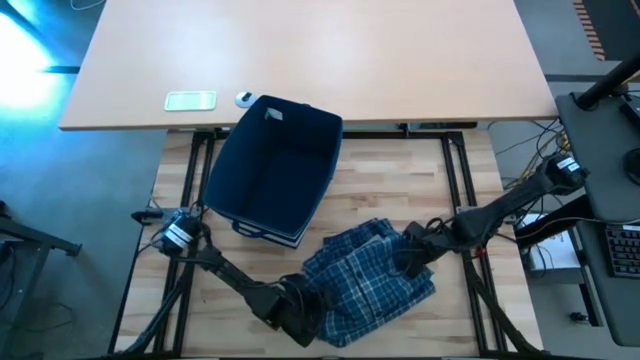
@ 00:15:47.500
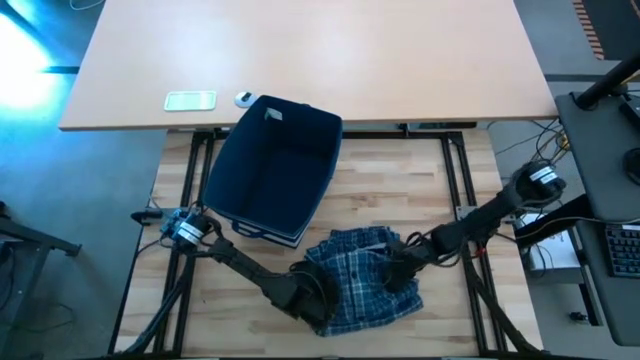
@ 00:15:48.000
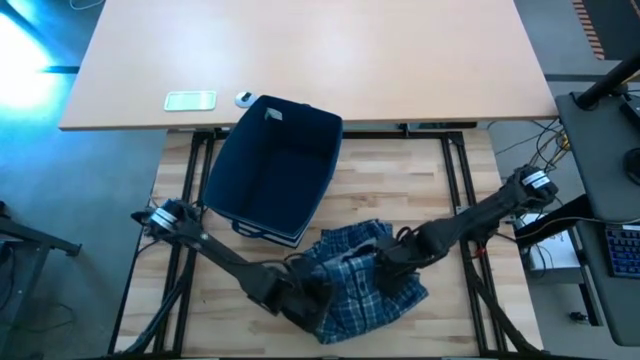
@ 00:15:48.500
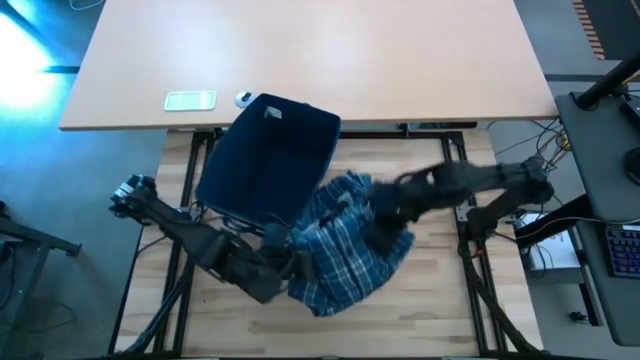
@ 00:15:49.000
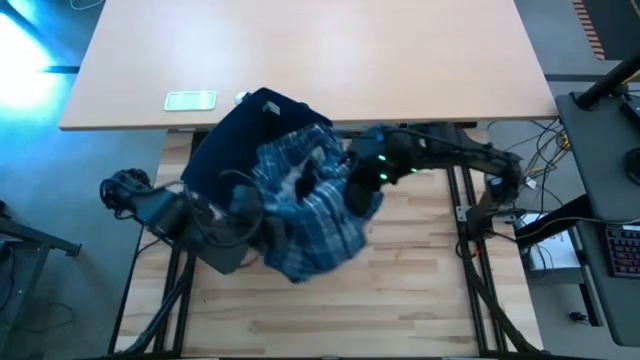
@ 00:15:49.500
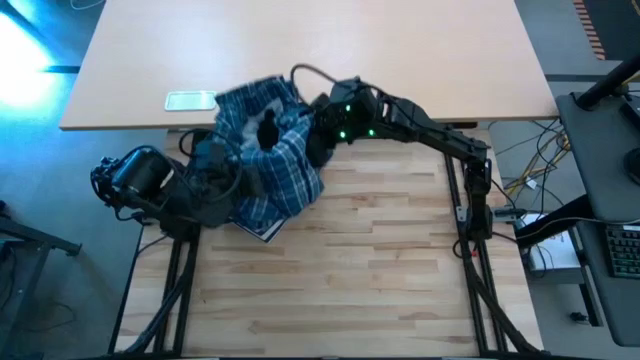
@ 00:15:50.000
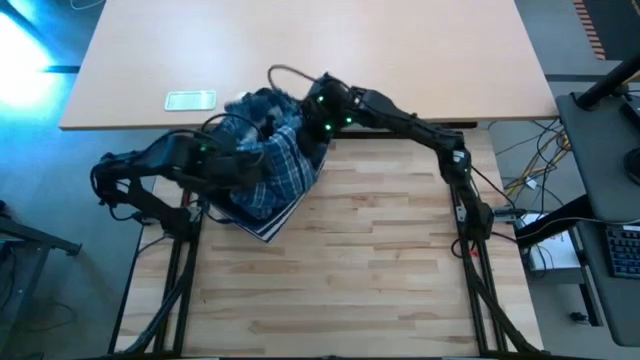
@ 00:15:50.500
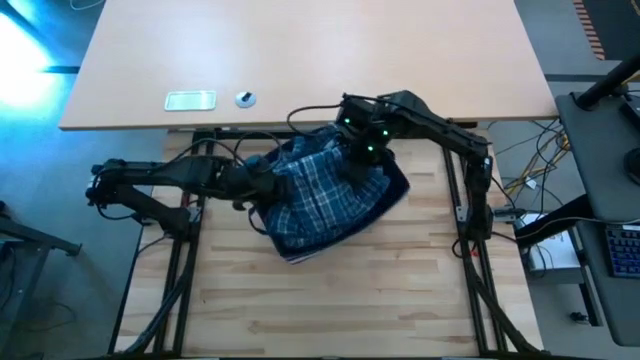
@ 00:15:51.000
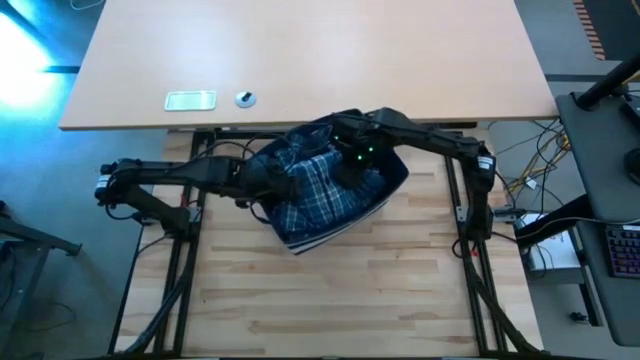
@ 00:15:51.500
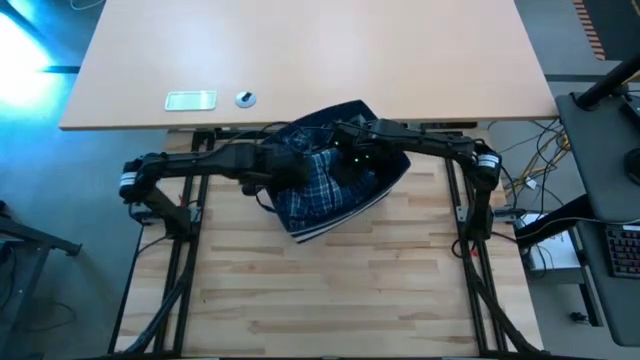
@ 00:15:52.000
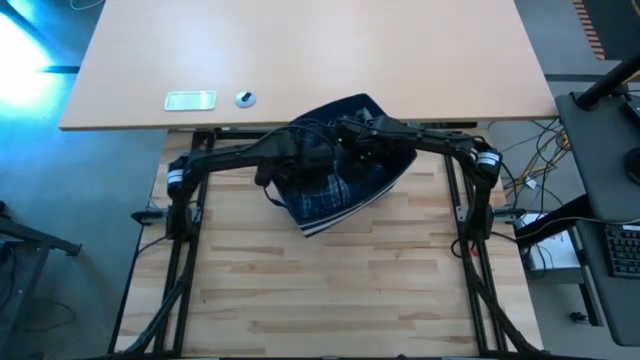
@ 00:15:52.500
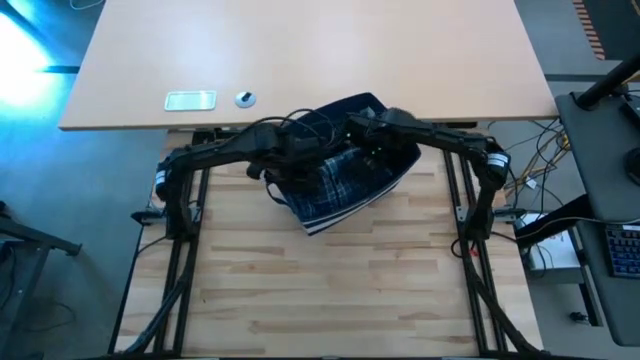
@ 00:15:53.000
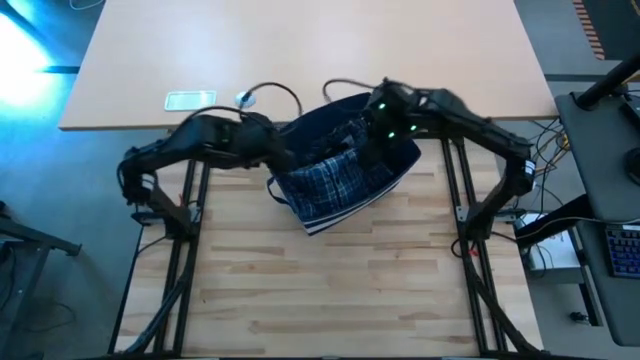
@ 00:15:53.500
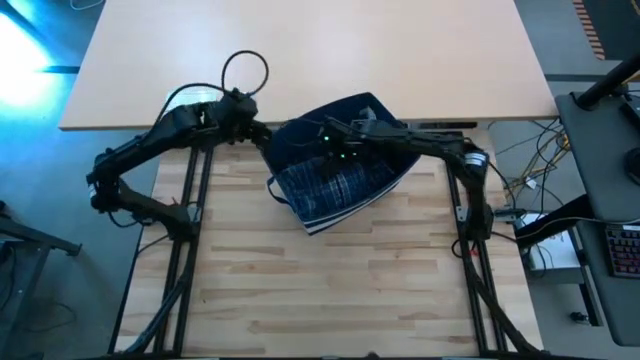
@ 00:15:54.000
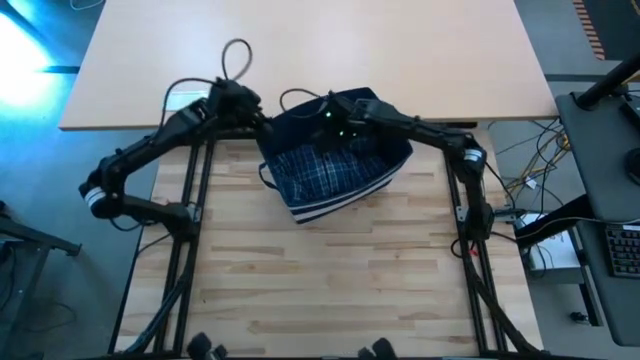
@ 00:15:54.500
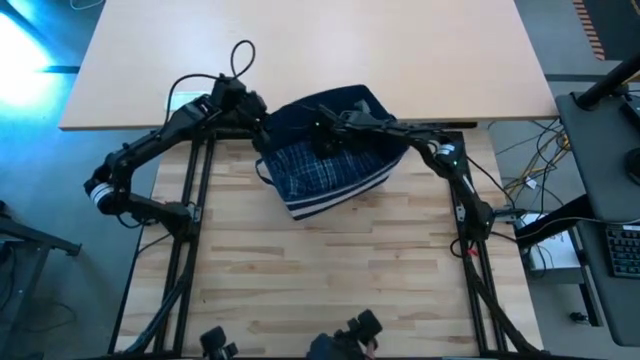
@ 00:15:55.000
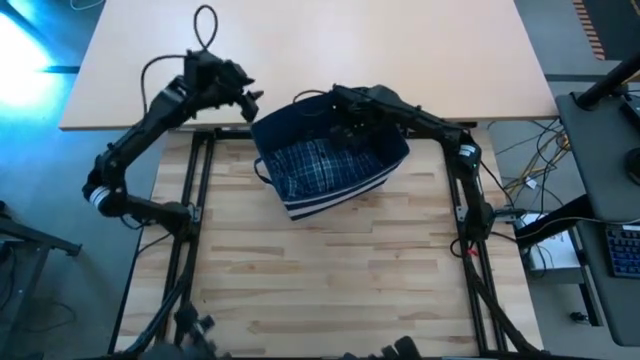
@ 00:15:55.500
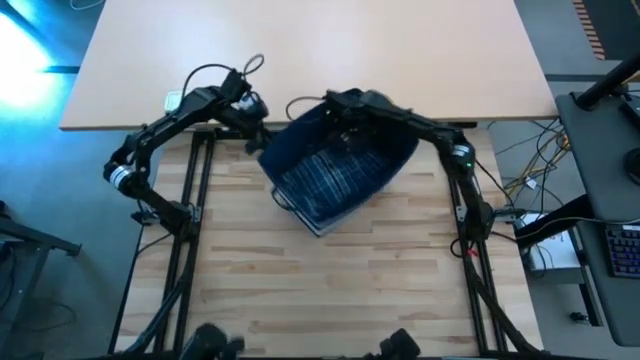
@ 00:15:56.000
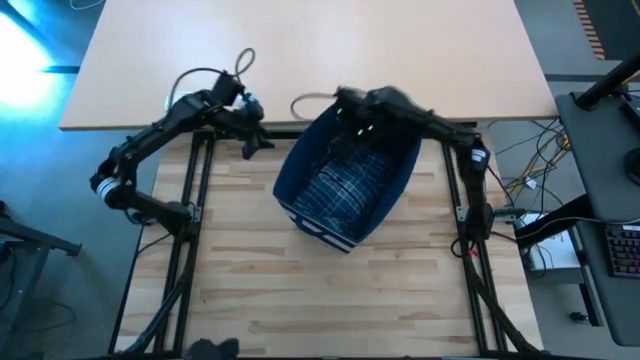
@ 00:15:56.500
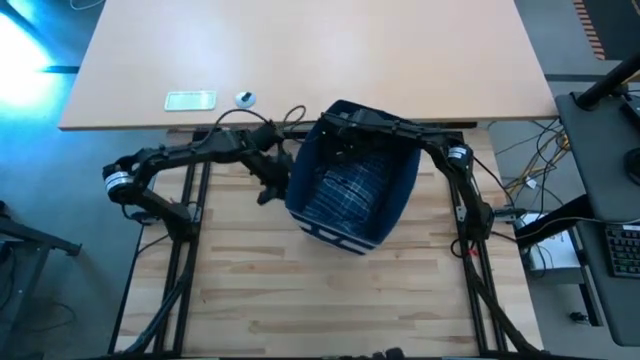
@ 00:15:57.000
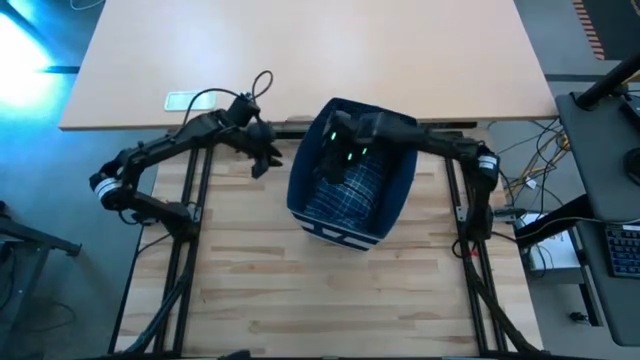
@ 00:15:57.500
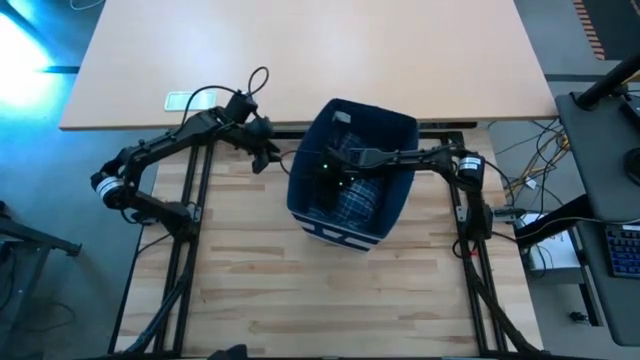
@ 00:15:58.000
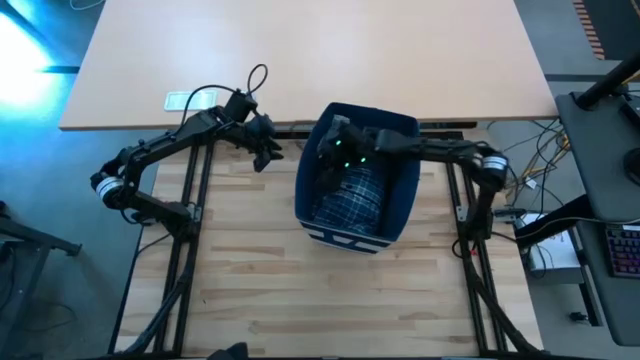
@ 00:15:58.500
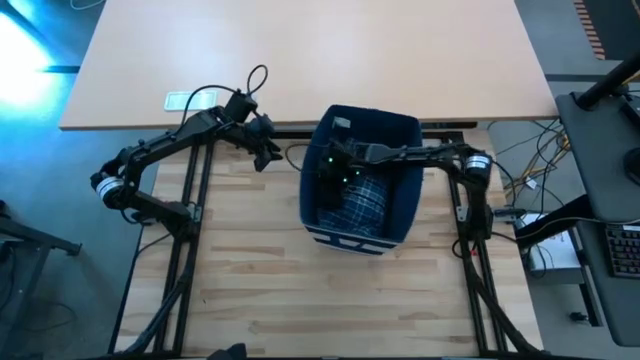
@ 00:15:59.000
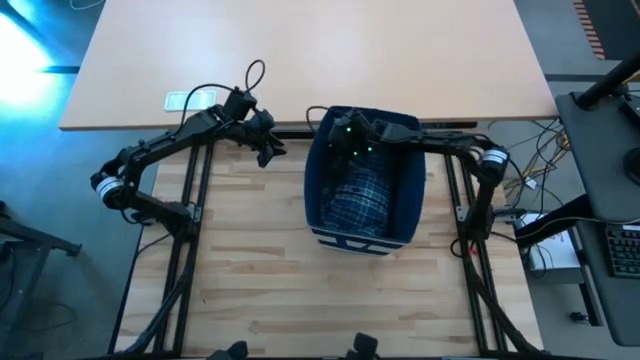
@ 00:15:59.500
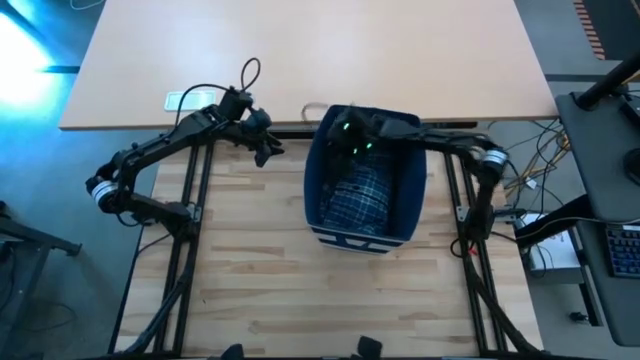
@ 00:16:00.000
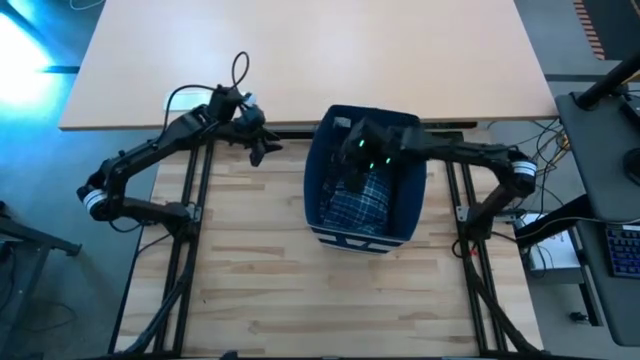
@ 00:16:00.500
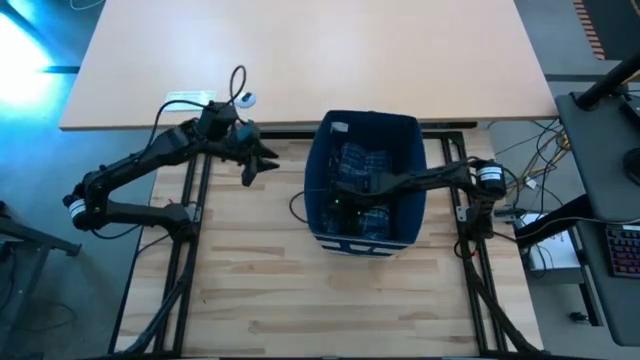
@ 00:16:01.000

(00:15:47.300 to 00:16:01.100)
Task: Fold Laundry from Bin
Put the stacked clothes into the laundry bin

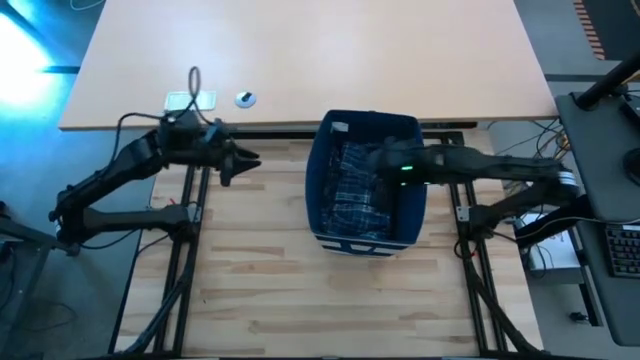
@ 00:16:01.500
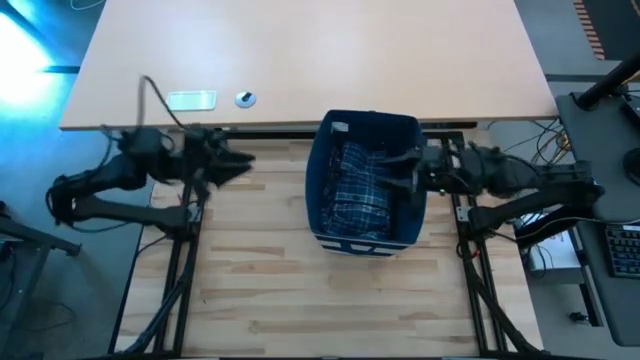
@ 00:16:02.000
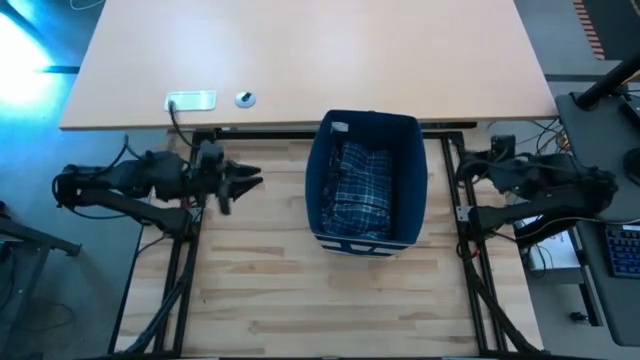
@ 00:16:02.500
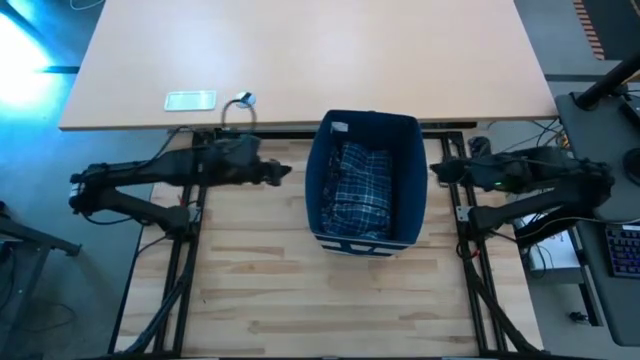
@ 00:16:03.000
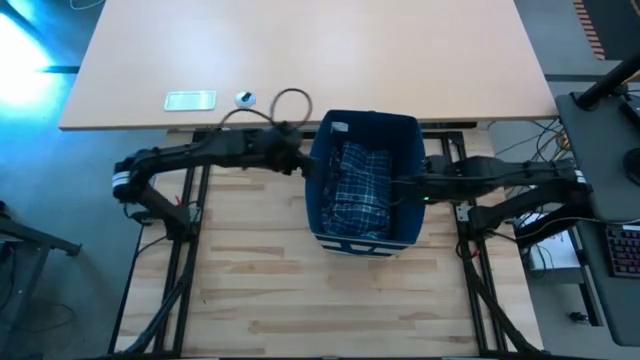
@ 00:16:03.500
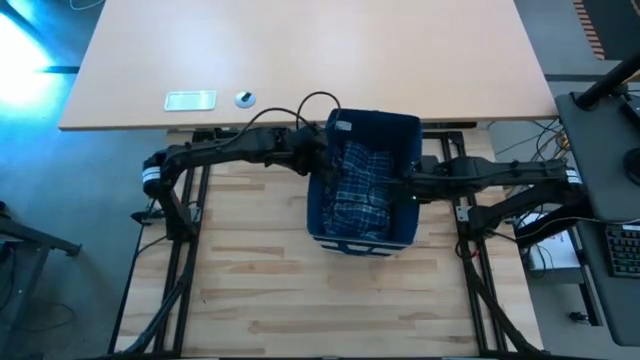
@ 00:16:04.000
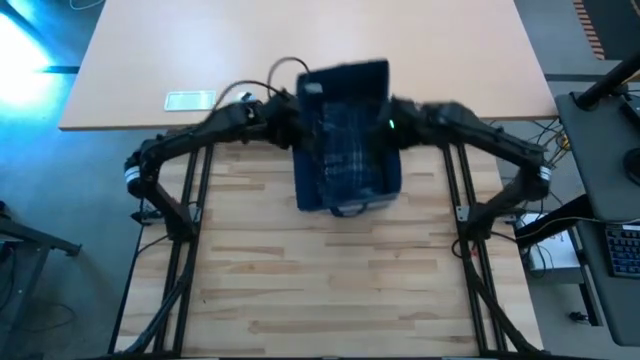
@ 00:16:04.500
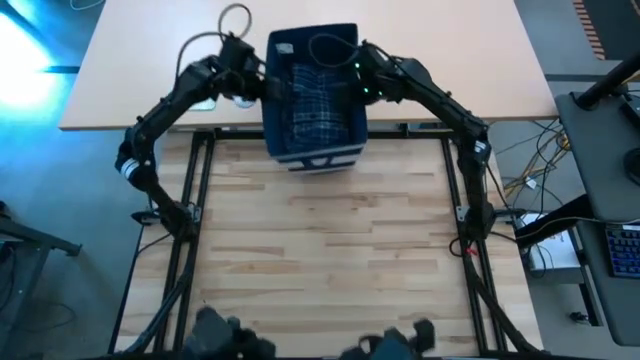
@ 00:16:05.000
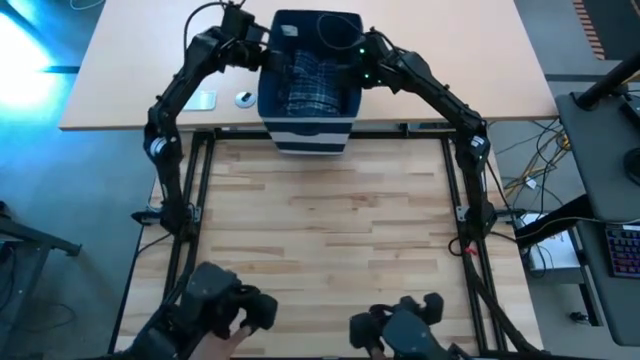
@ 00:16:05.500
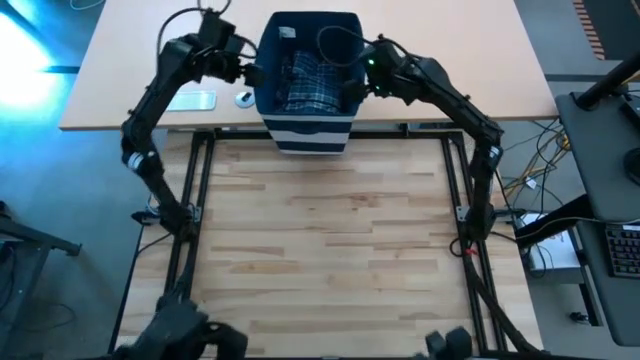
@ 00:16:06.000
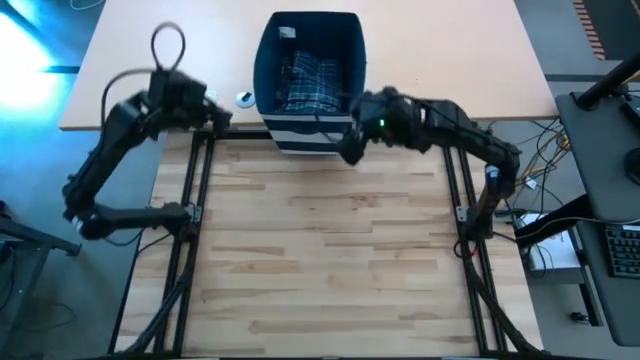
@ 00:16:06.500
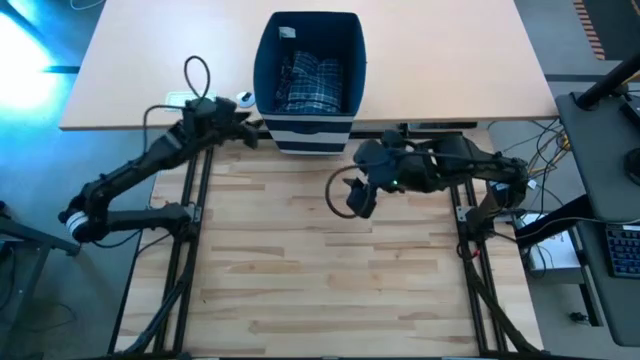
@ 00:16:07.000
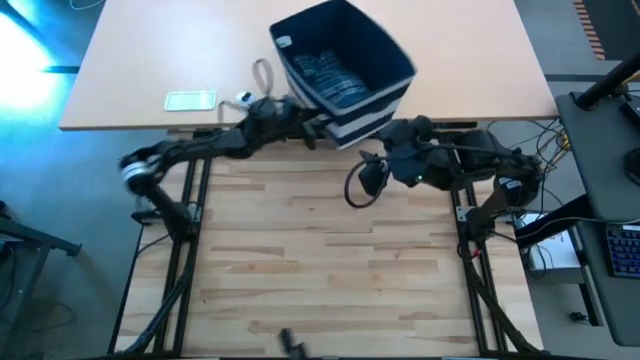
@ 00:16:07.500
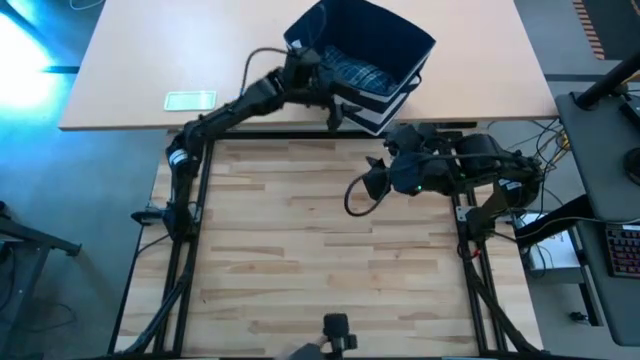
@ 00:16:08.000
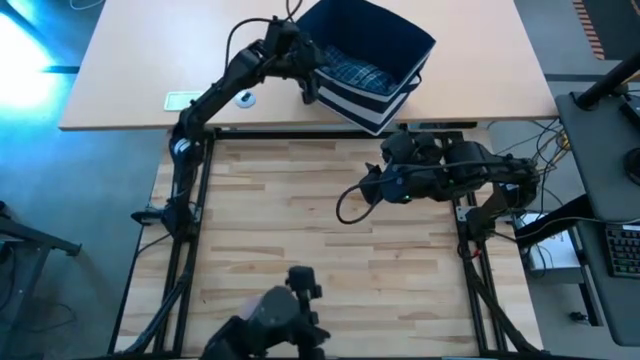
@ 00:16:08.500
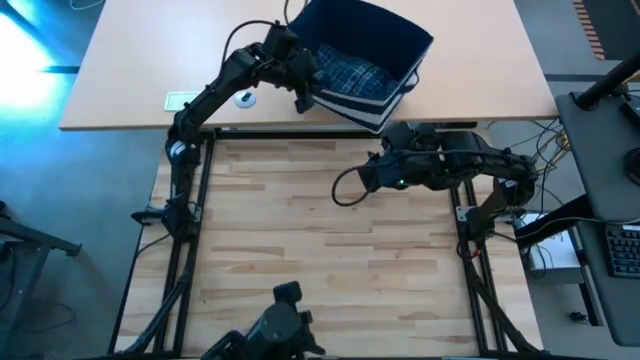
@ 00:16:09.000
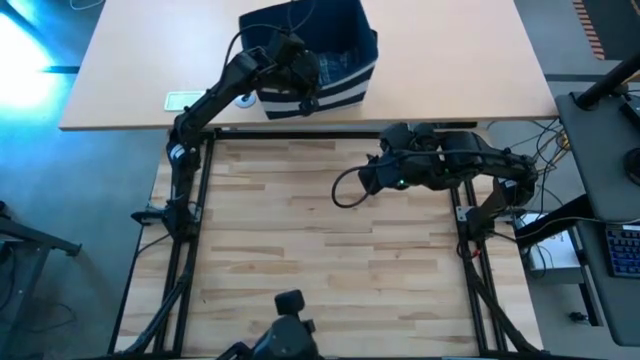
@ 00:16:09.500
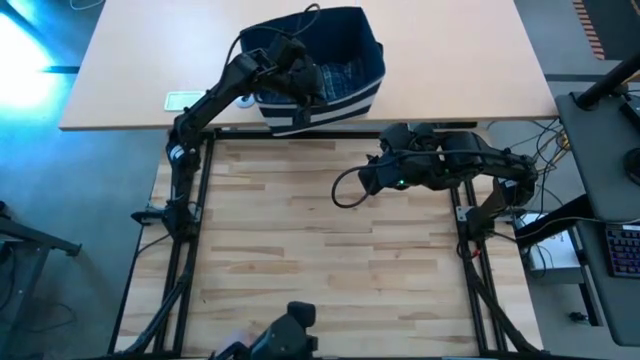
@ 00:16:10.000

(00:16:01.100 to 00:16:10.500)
Move the laundry bin to the other table
